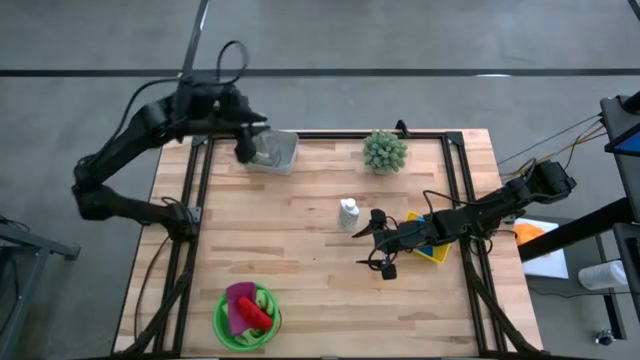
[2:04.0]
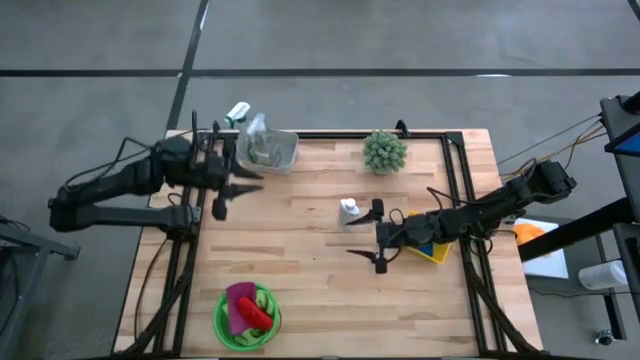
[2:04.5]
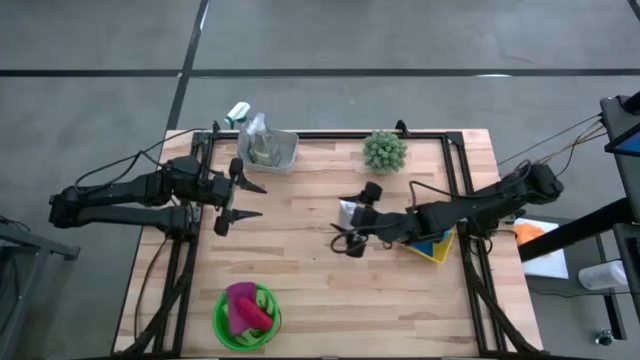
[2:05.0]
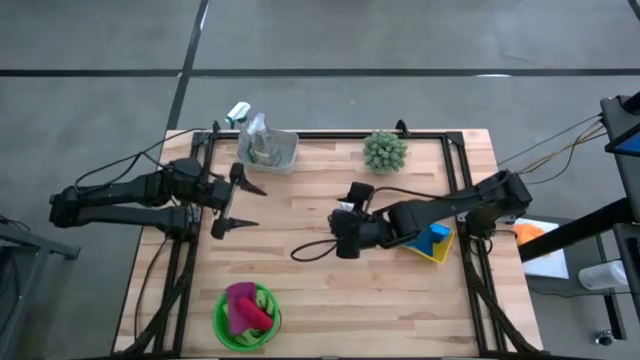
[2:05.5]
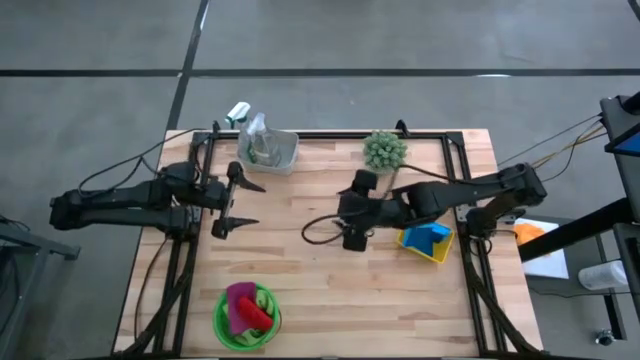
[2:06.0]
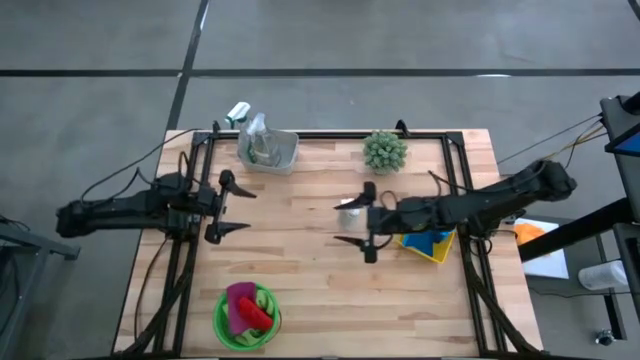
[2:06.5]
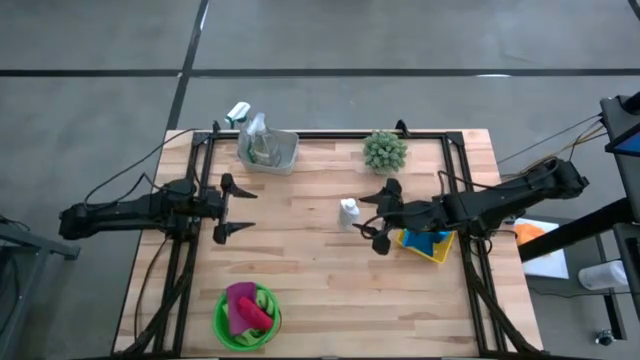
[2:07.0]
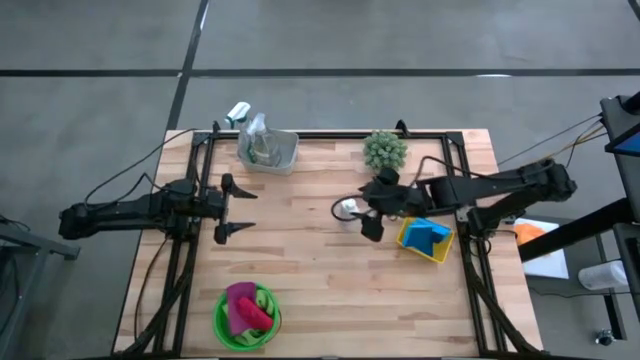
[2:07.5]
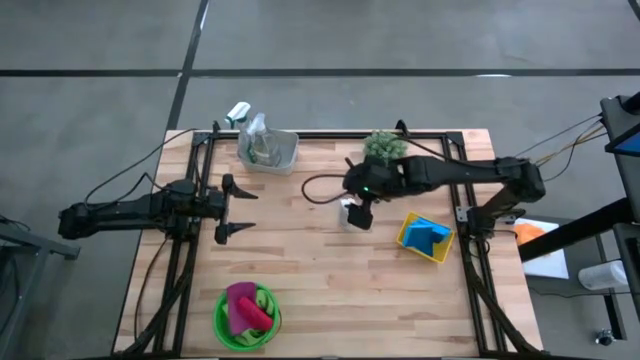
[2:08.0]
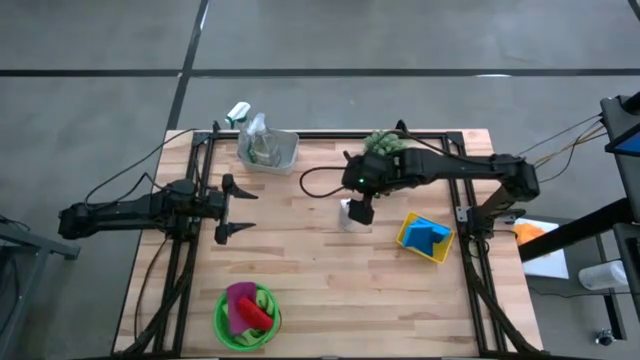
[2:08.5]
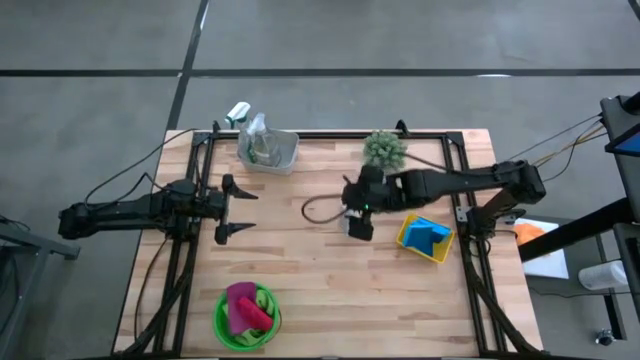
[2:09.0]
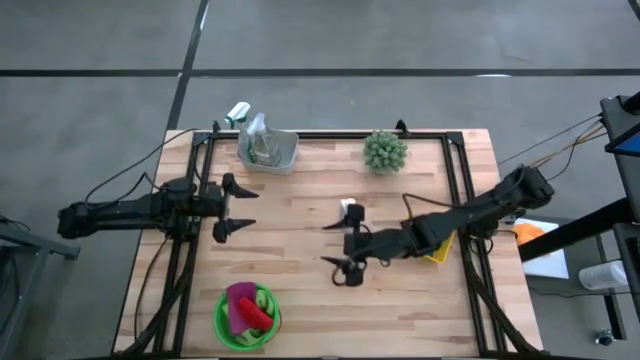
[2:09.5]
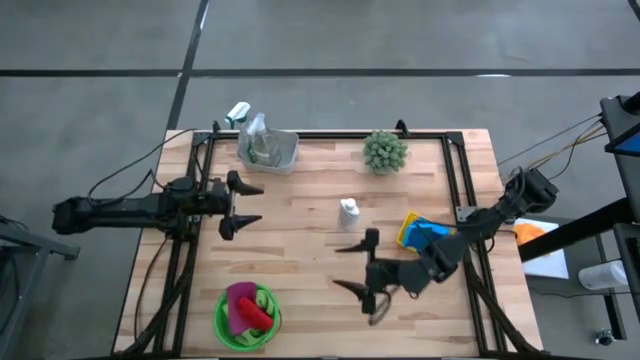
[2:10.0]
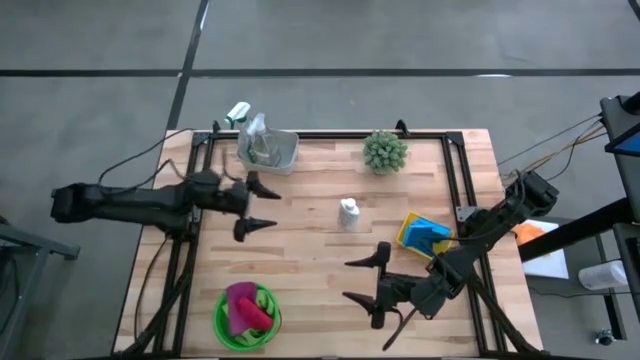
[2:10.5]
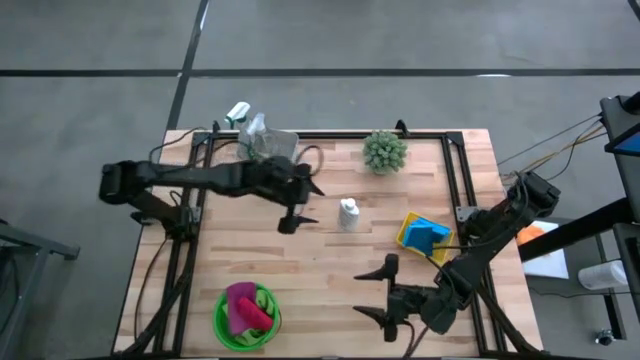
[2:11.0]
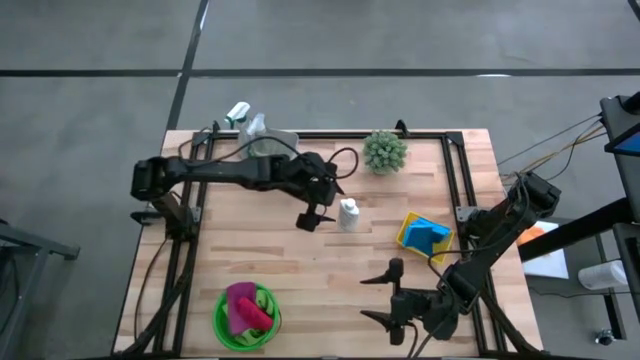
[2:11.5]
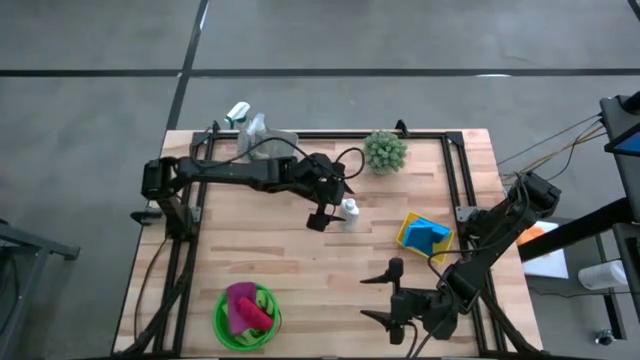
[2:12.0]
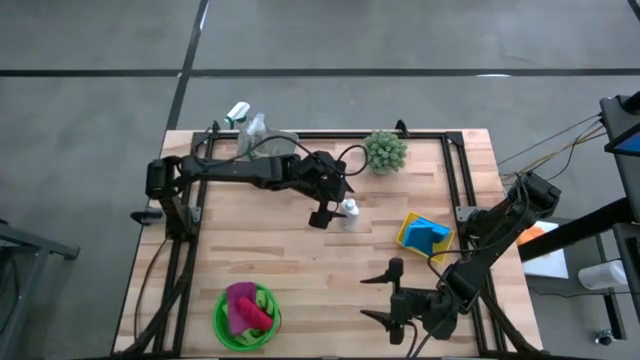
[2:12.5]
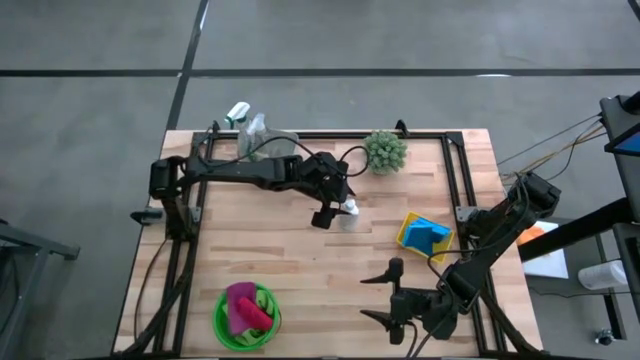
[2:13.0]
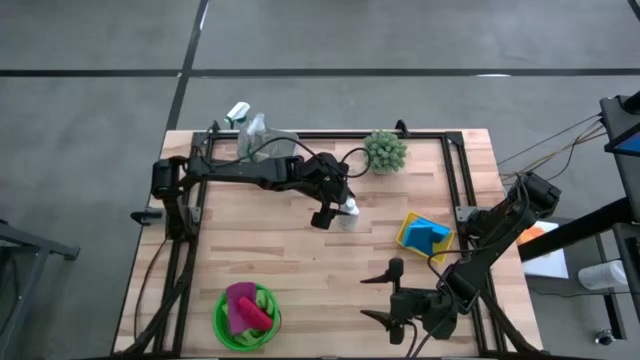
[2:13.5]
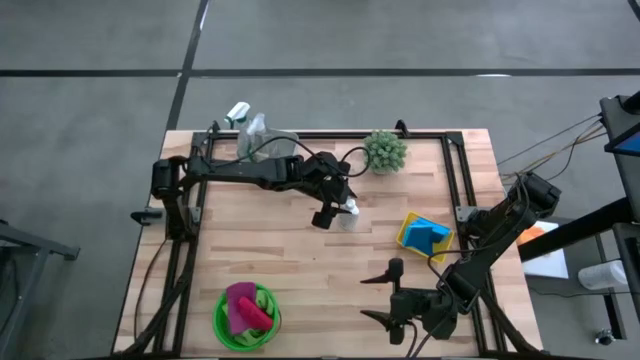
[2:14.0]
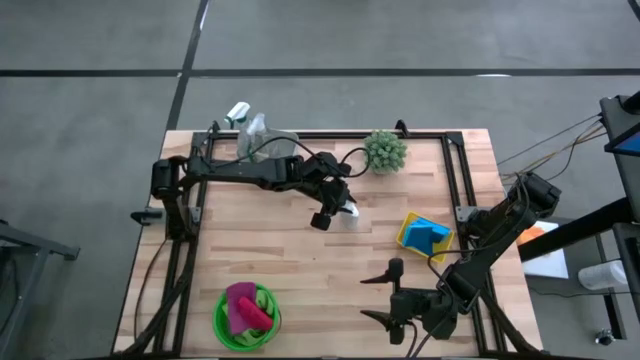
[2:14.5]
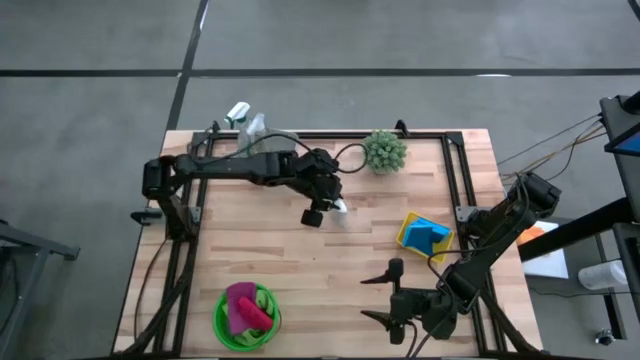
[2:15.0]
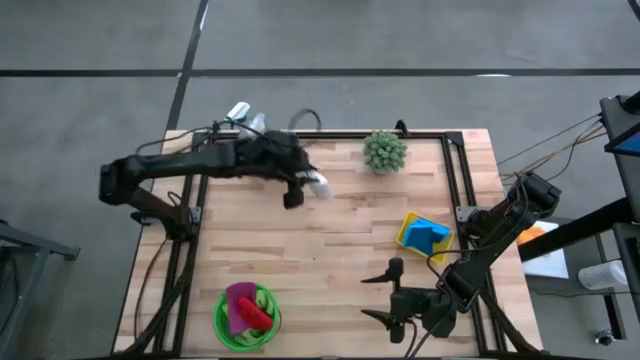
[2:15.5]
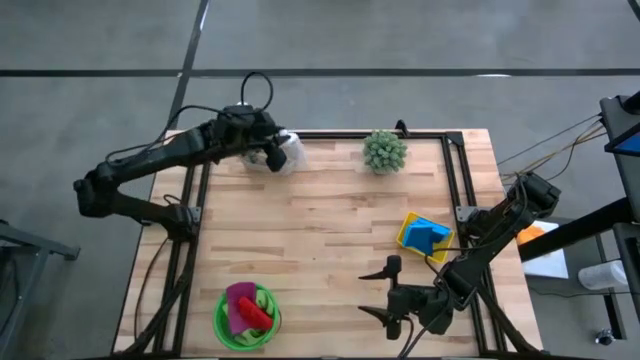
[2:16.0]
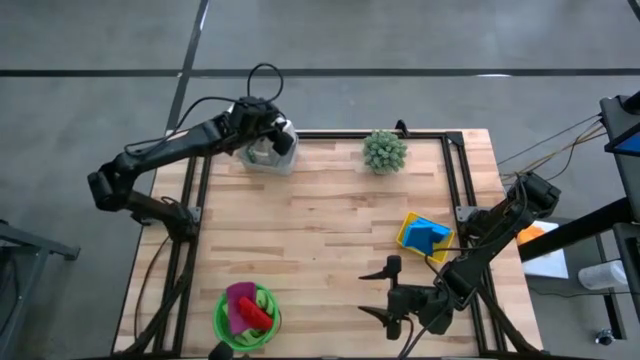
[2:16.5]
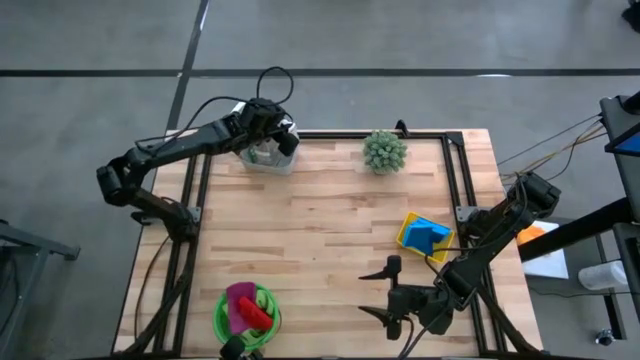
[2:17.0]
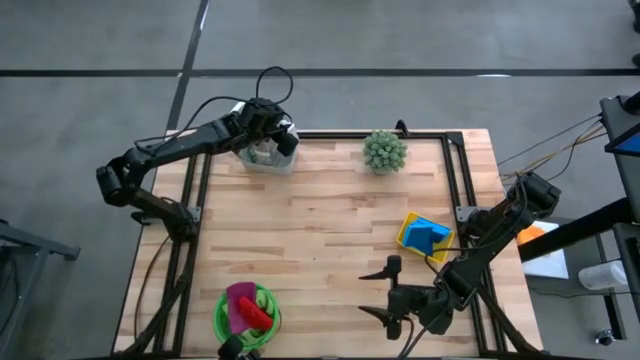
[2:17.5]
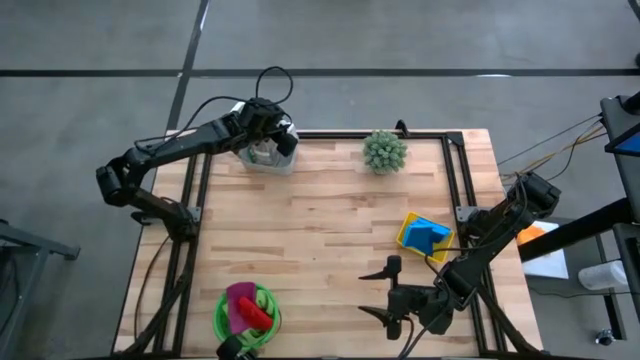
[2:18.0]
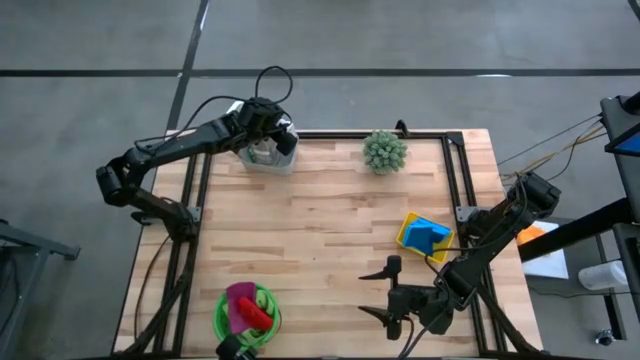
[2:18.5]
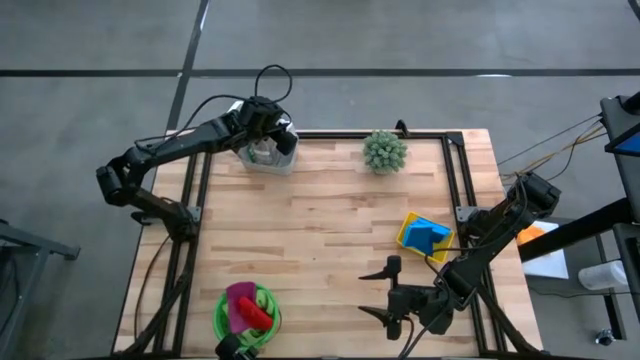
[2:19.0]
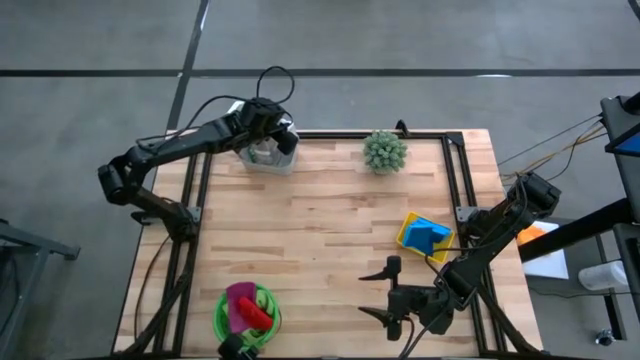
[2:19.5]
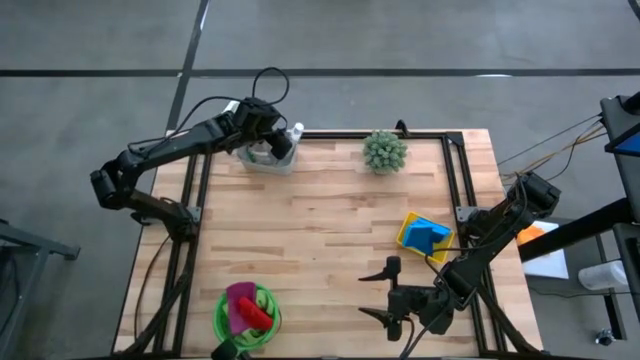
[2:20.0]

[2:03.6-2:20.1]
Task: Pick & Place Kitchen Items
Put the white cleaner bottle into the gray bin
